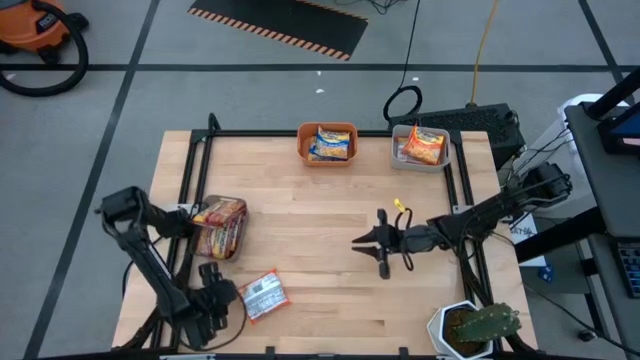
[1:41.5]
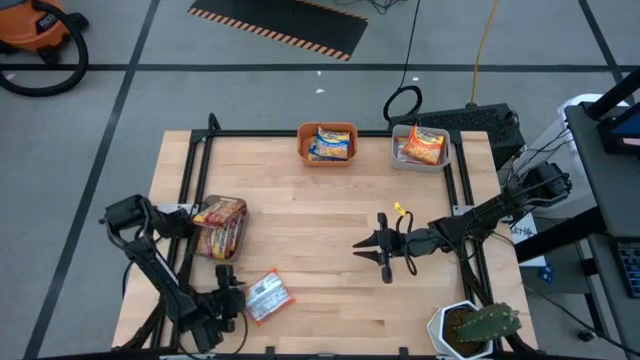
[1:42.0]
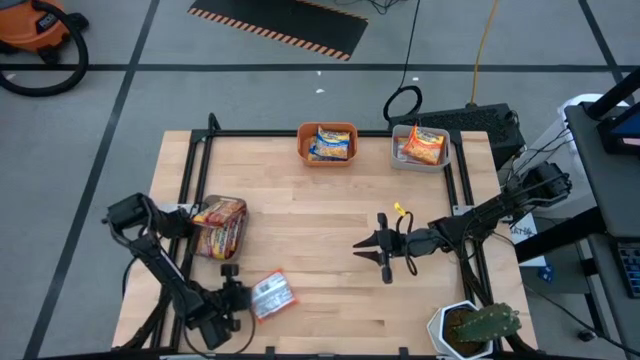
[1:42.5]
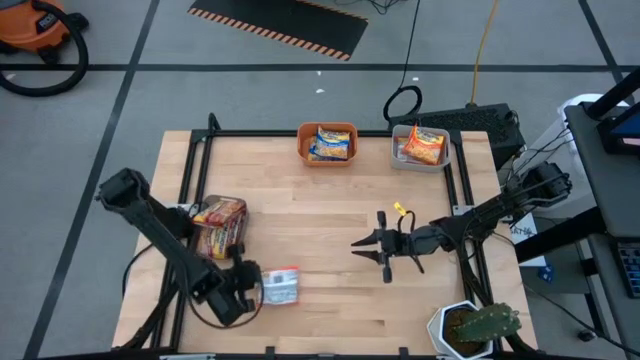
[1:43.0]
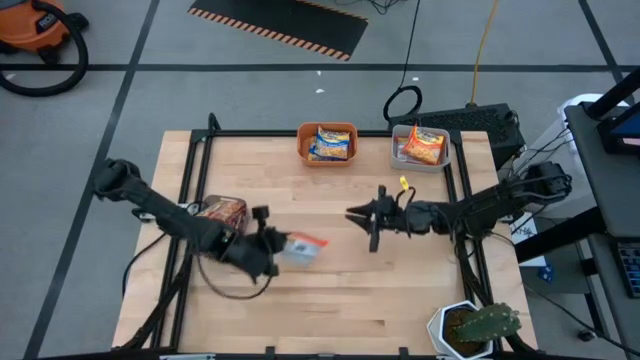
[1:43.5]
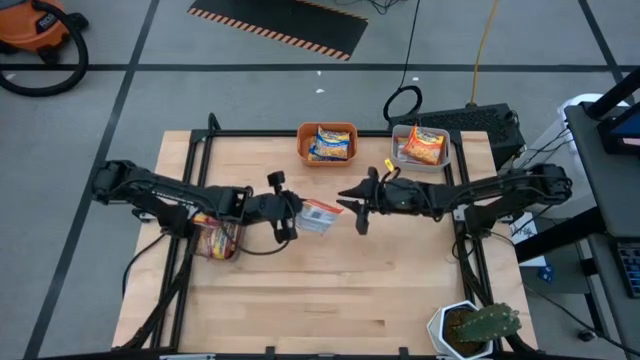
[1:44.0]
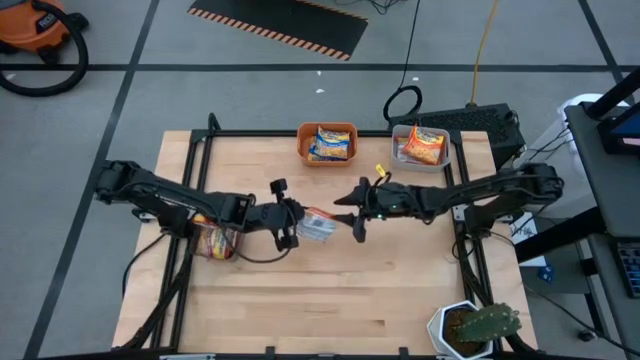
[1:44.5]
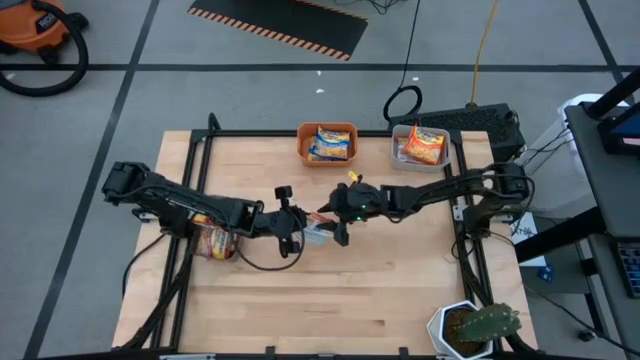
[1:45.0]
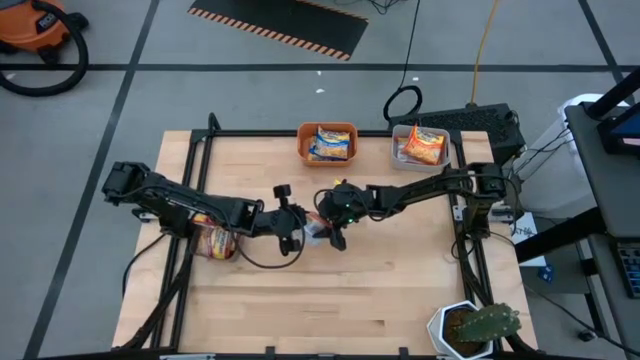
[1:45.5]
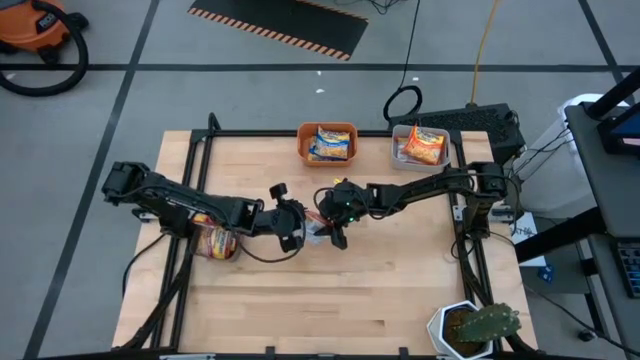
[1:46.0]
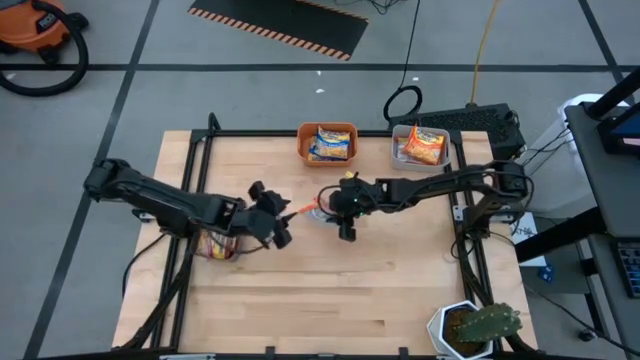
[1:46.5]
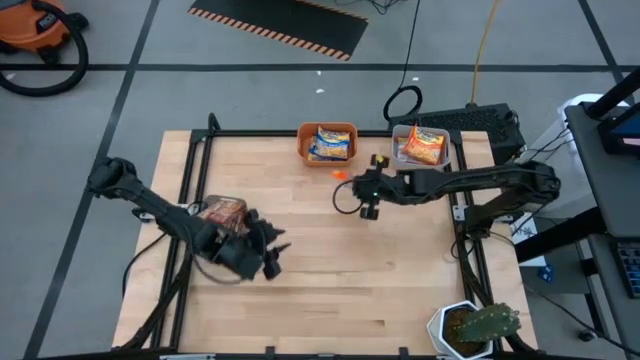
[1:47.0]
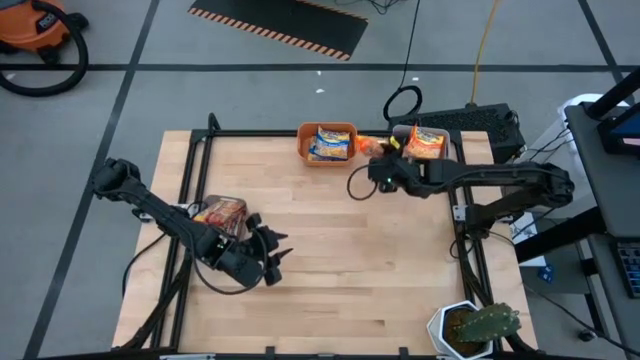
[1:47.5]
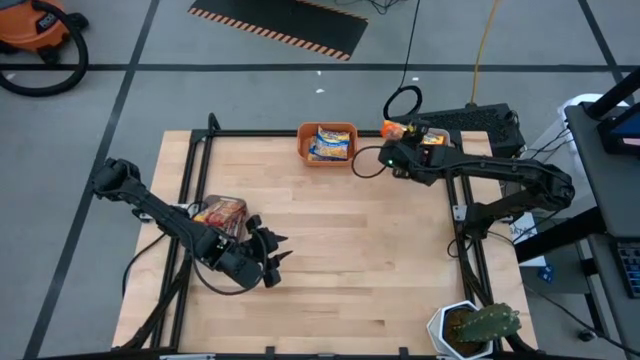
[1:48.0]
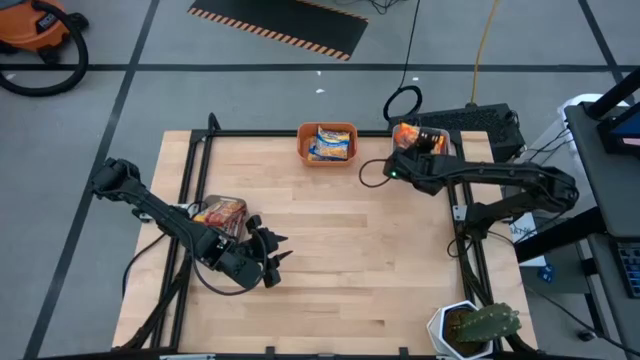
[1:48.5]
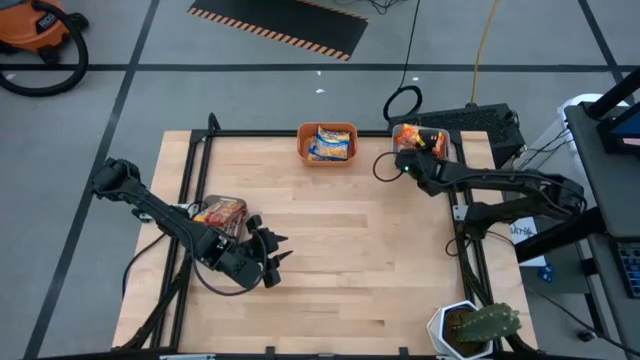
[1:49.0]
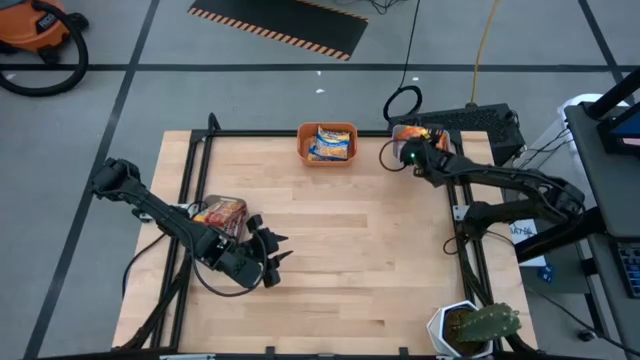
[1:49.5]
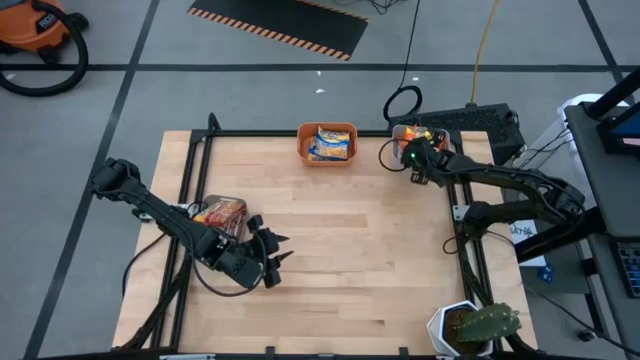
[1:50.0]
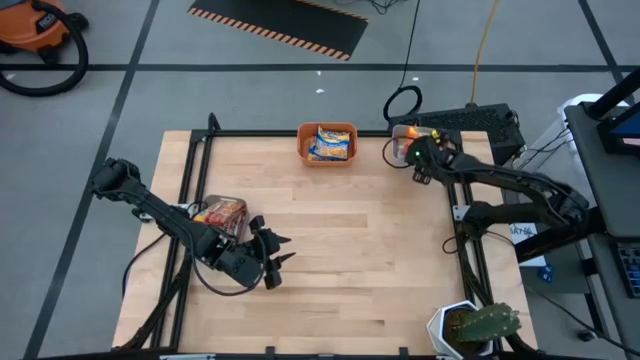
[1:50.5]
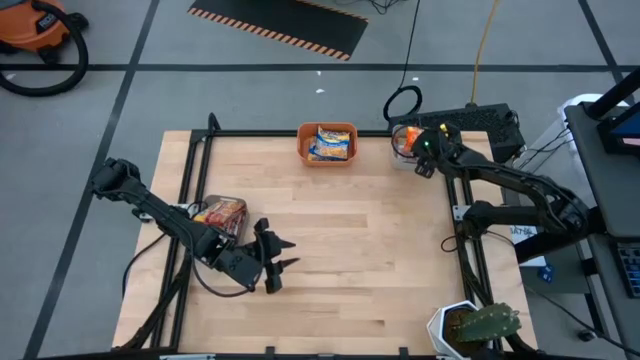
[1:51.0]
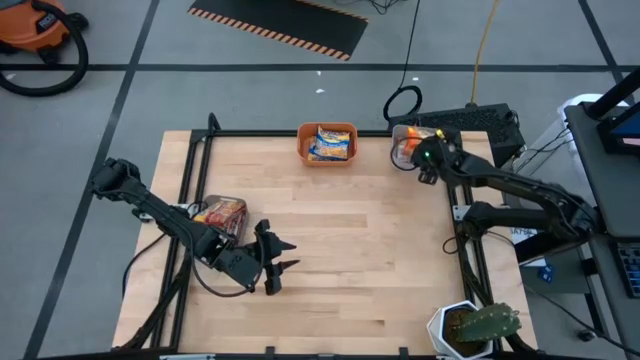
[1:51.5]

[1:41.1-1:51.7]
Task: Sort Maruchan noodles
Put the orange noodle pack into the gray bin

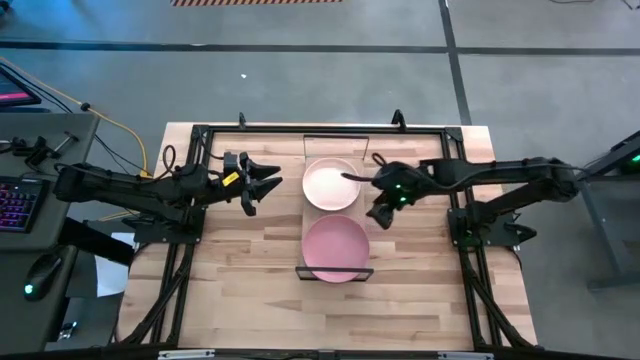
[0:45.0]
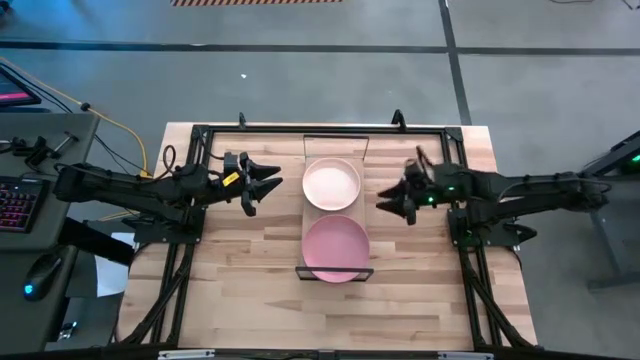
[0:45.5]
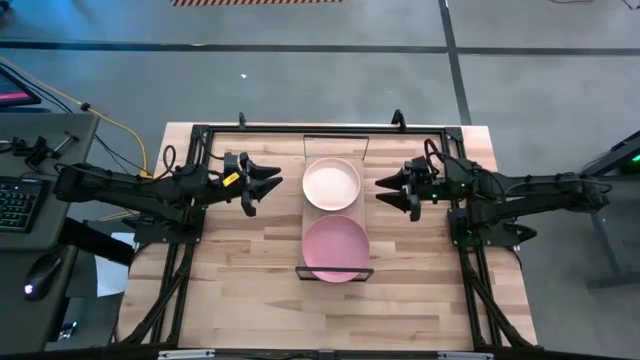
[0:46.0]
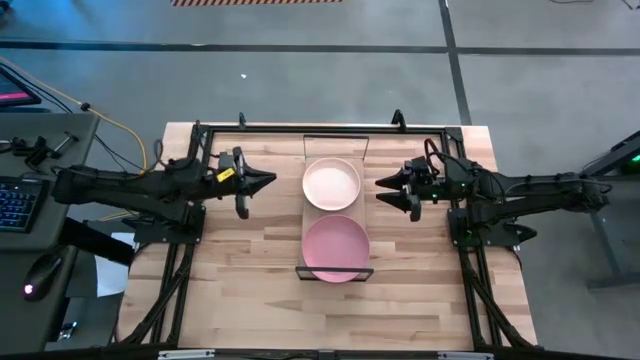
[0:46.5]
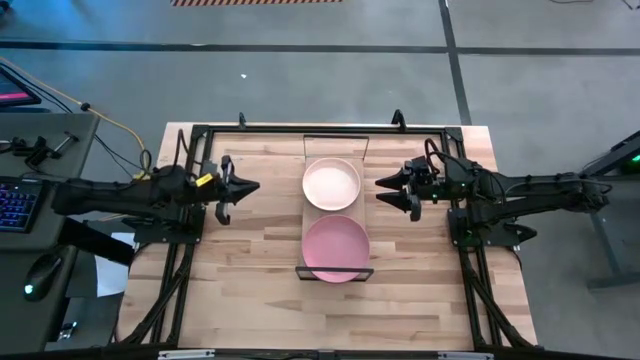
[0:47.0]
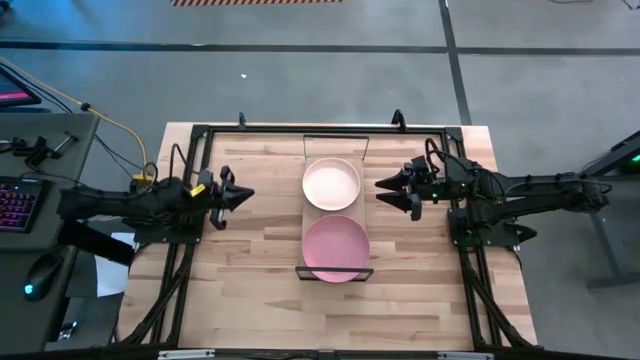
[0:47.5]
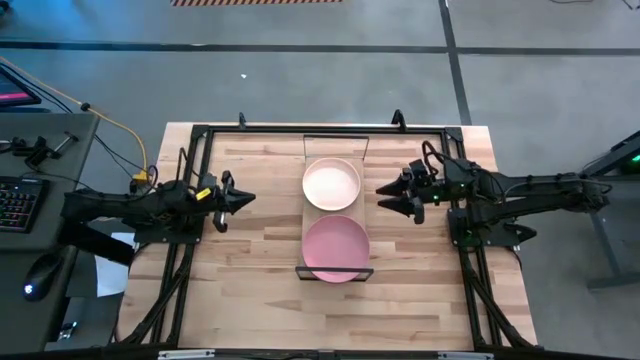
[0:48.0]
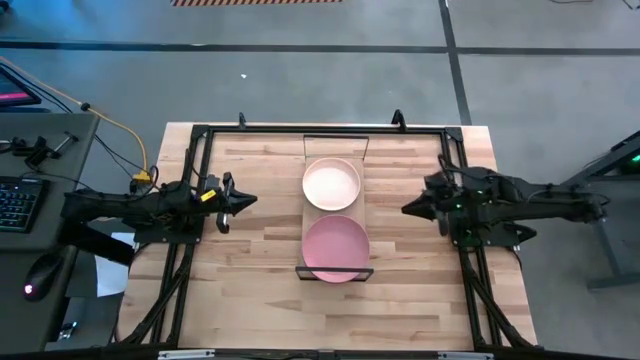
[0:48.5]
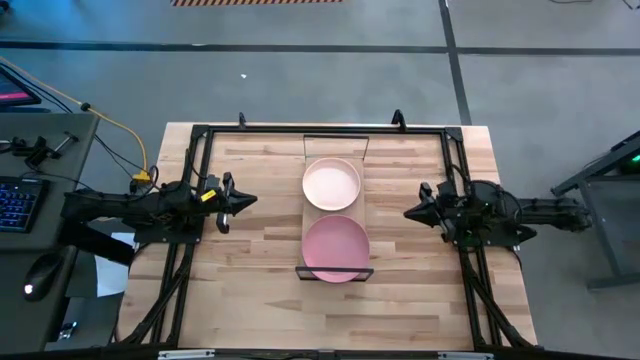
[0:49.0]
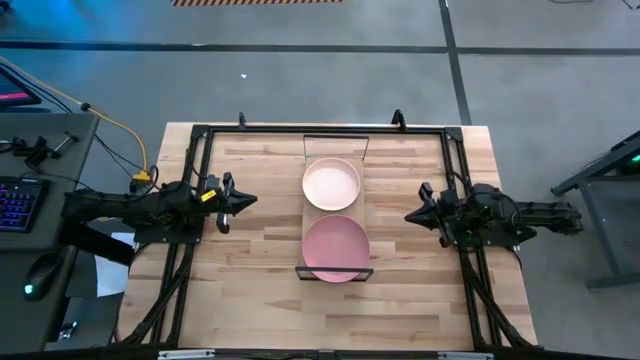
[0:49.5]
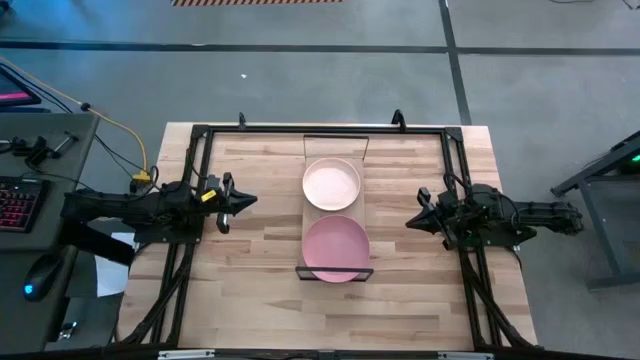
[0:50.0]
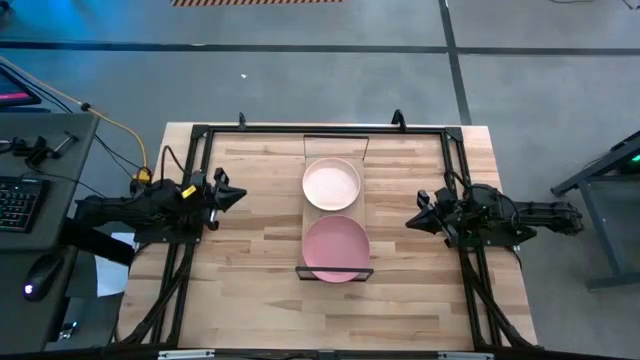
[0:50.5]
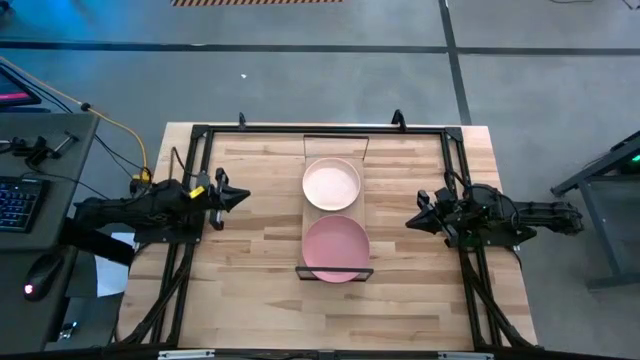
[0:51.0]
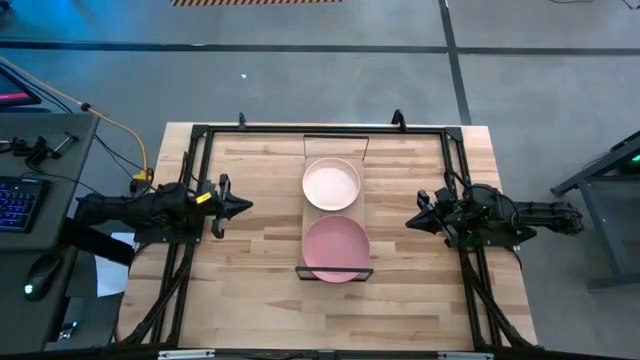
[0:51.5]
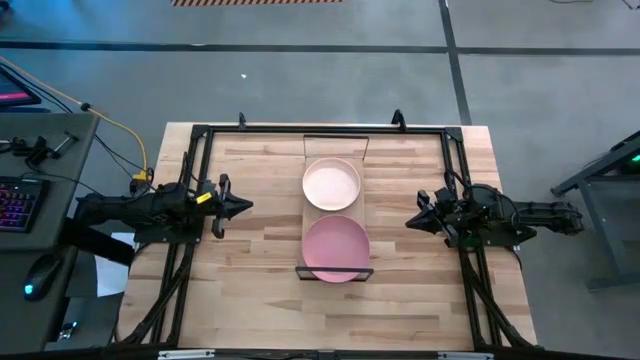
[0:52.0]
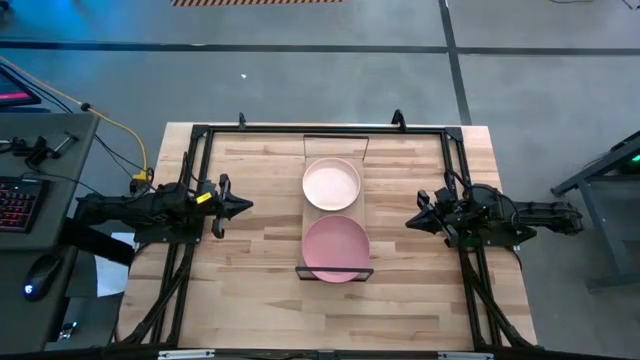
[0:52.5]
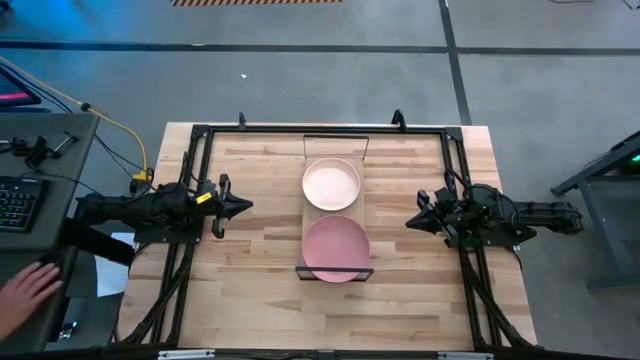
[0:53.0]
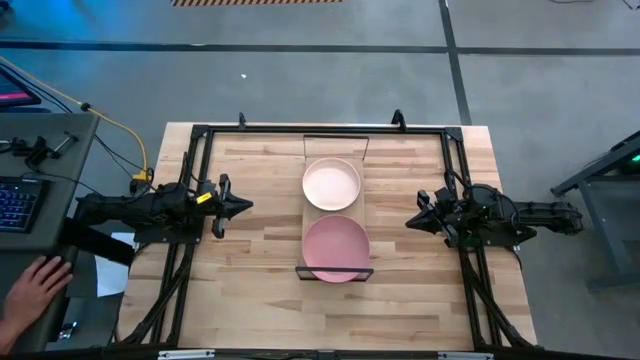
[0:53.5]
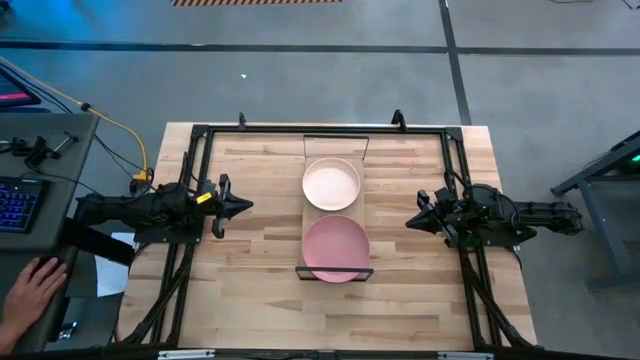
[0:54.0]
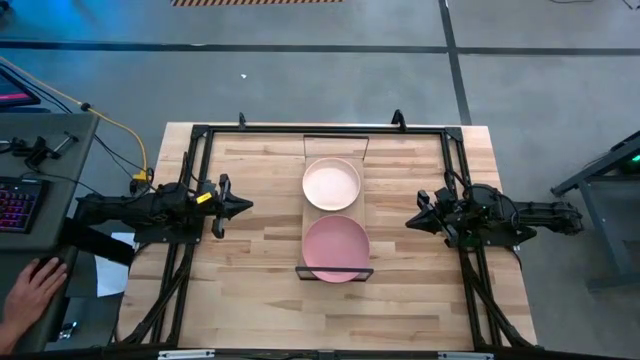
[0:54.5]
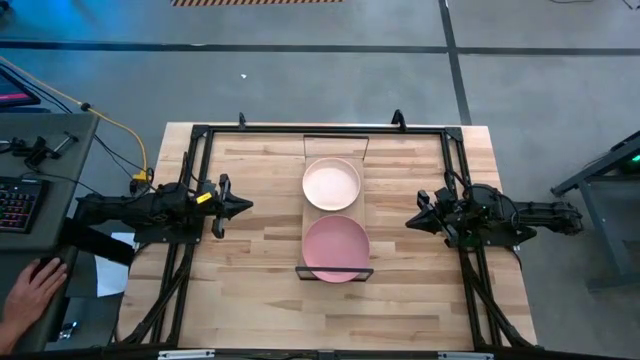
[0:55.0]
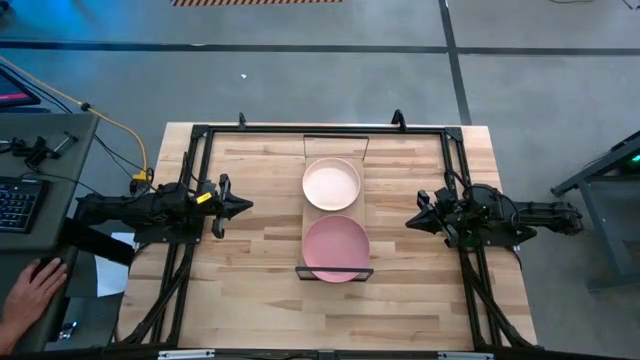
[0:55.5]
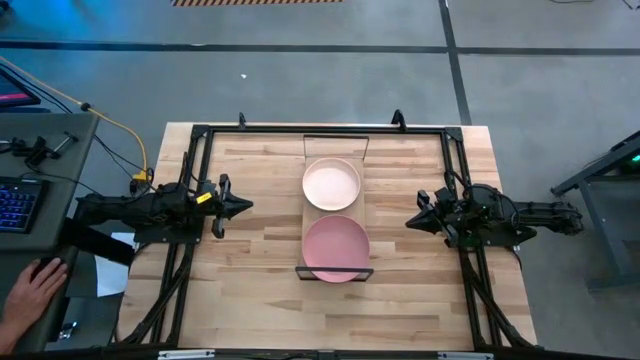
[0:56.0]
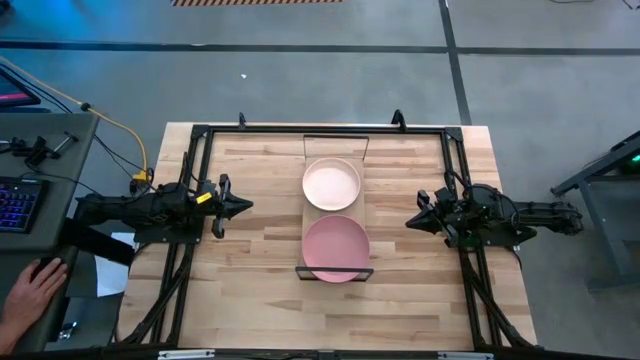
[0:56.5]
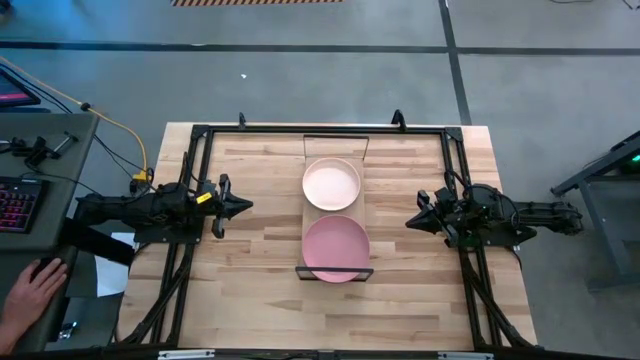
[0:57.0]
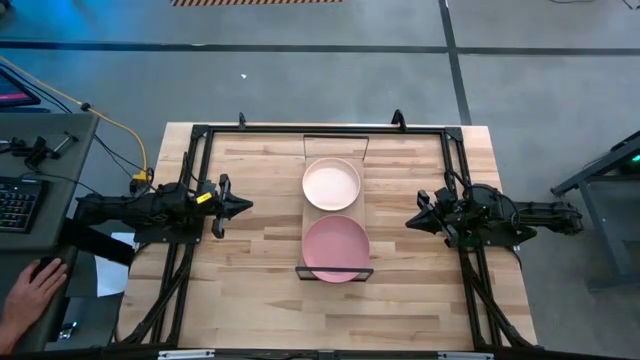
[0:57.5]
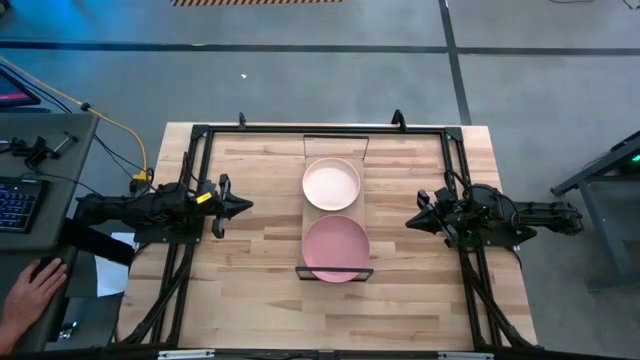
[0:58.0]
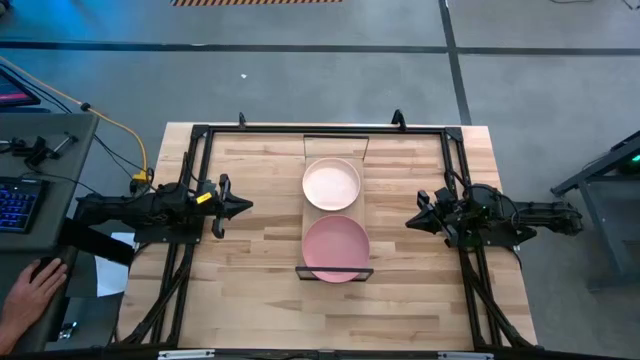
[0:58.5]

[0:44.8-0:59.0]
Task: Place and stack plates onto a shelf
Return to Home Position
